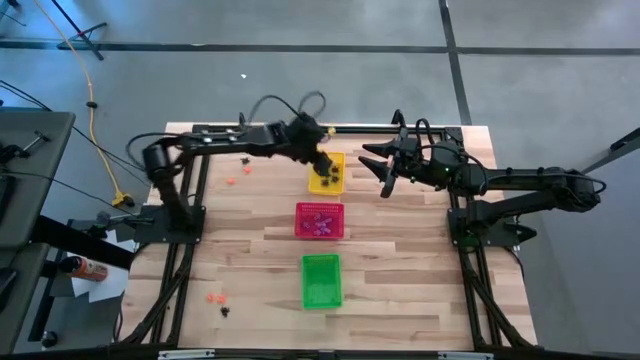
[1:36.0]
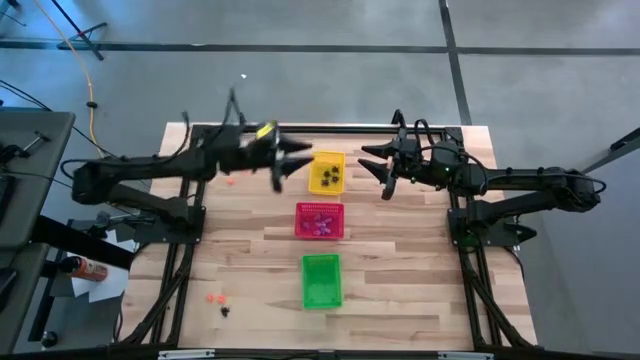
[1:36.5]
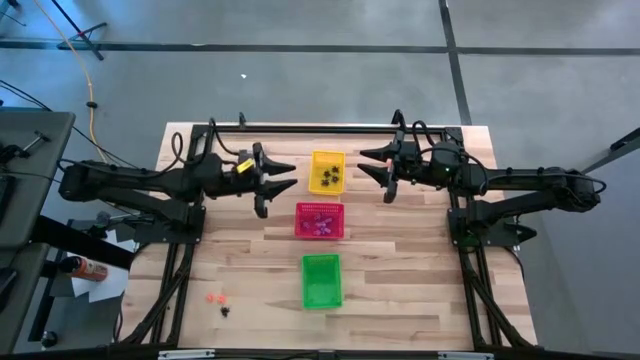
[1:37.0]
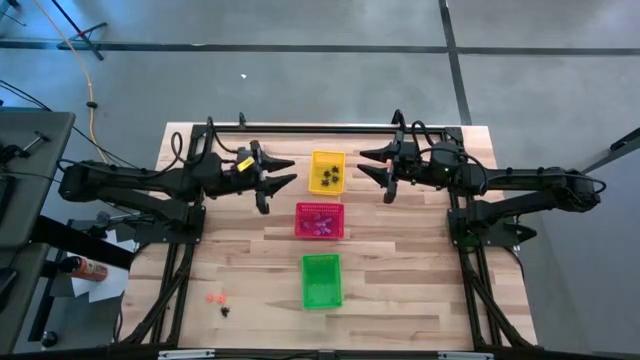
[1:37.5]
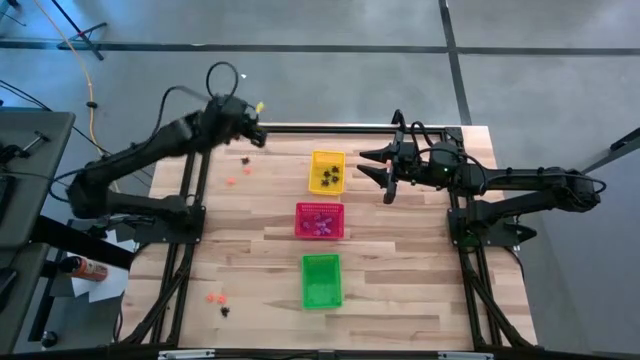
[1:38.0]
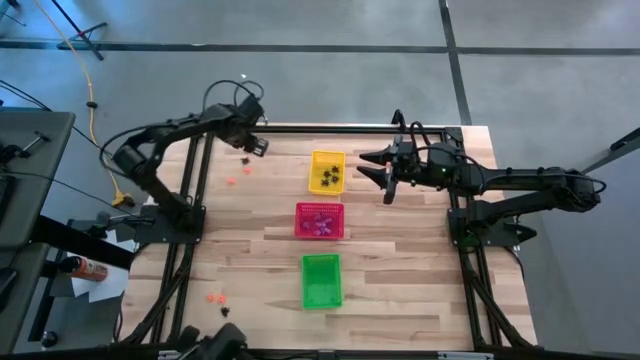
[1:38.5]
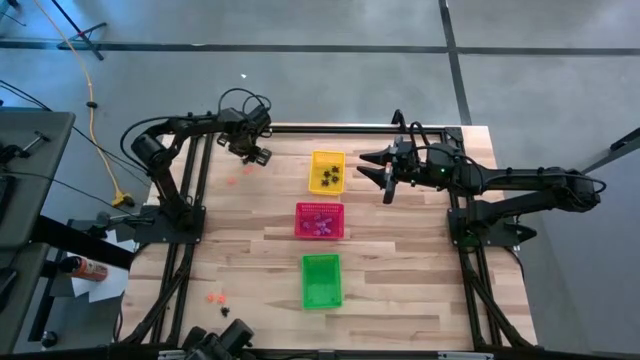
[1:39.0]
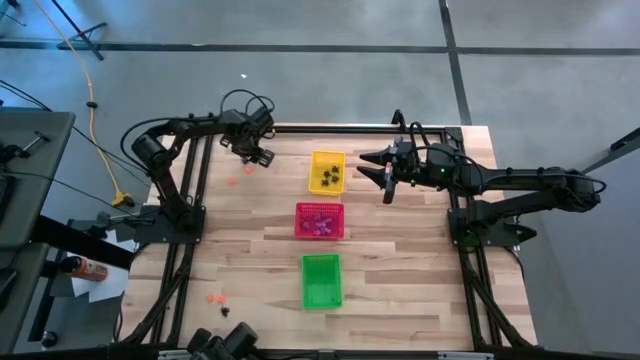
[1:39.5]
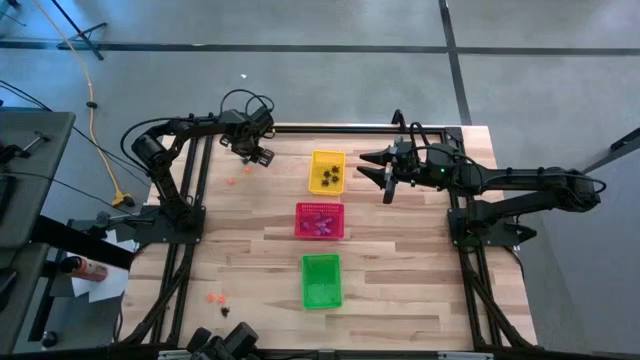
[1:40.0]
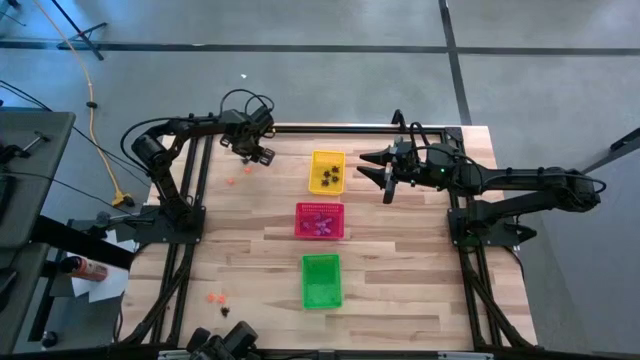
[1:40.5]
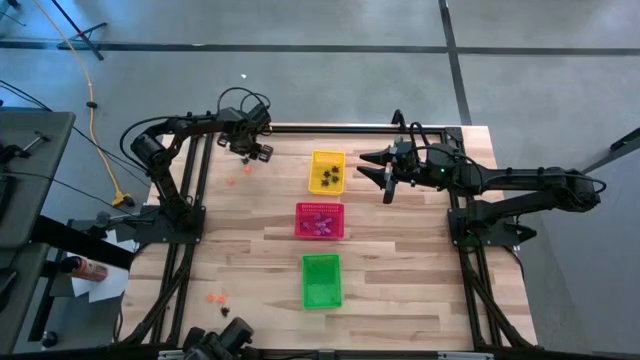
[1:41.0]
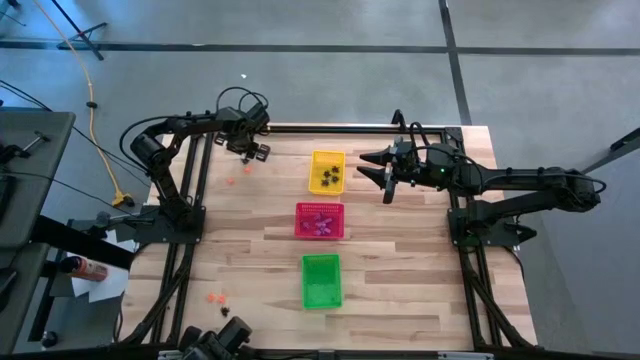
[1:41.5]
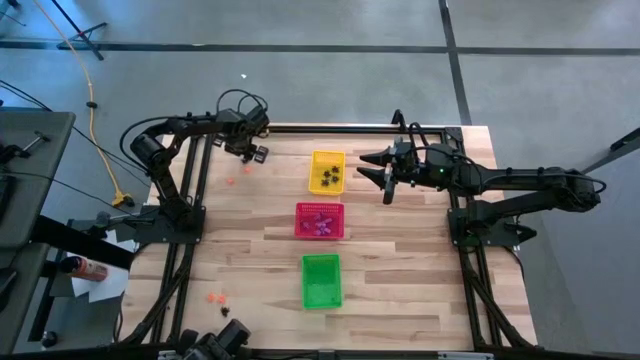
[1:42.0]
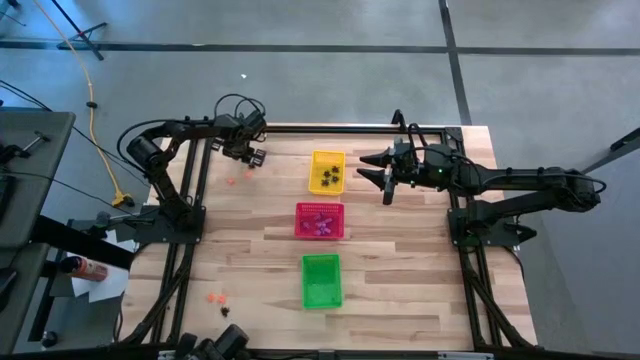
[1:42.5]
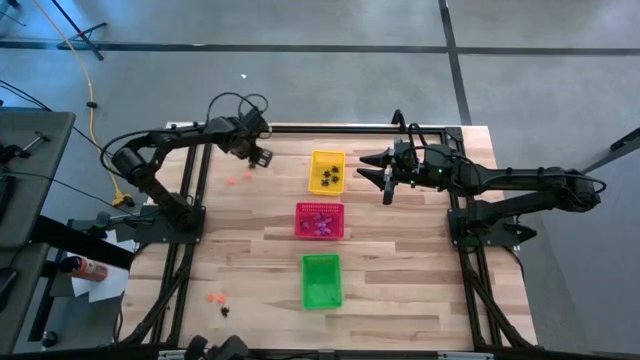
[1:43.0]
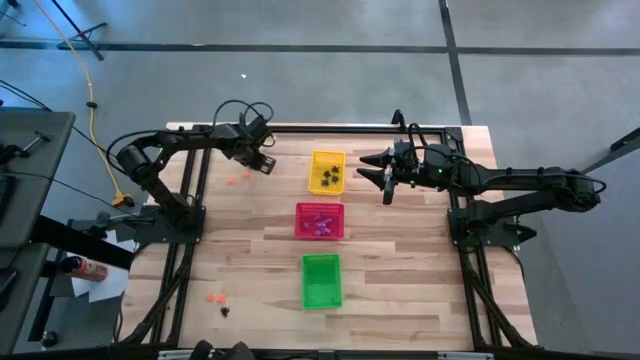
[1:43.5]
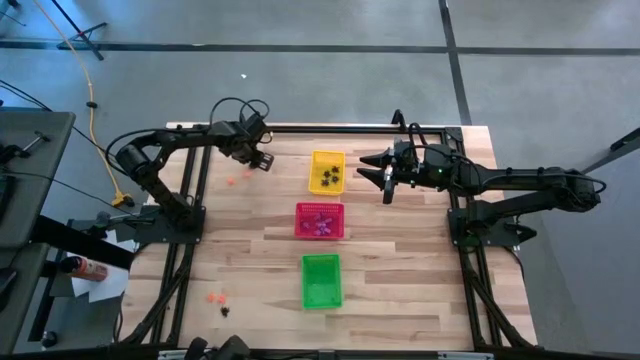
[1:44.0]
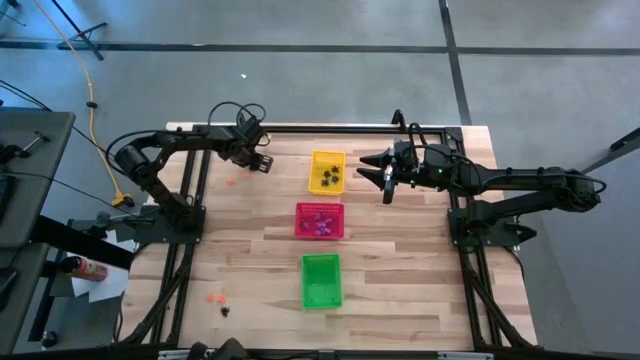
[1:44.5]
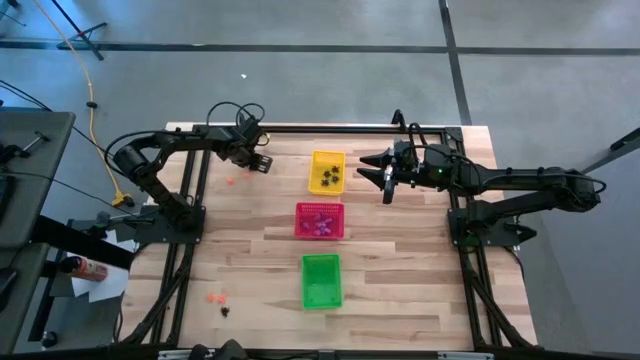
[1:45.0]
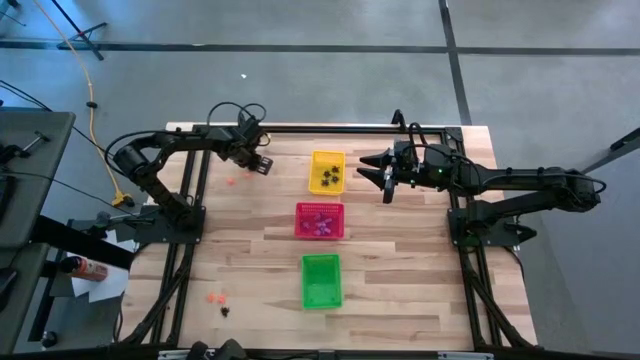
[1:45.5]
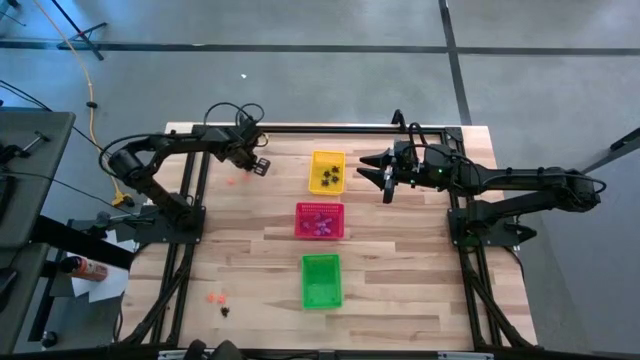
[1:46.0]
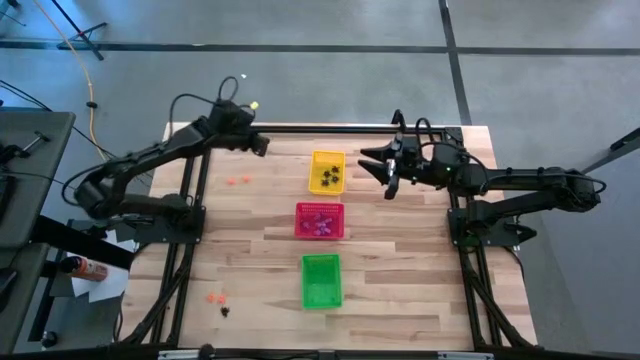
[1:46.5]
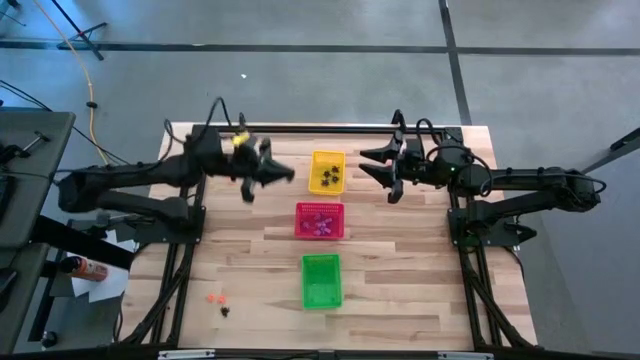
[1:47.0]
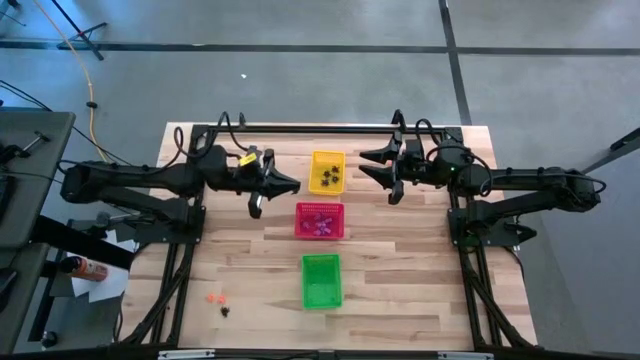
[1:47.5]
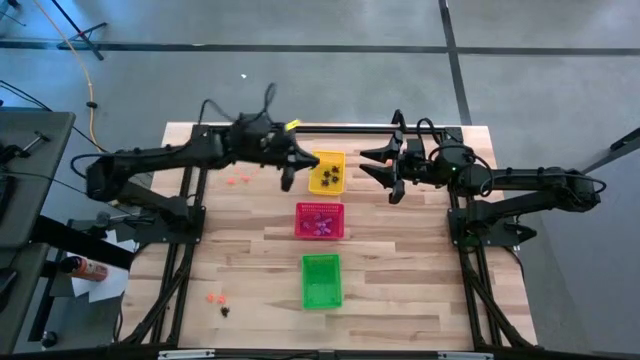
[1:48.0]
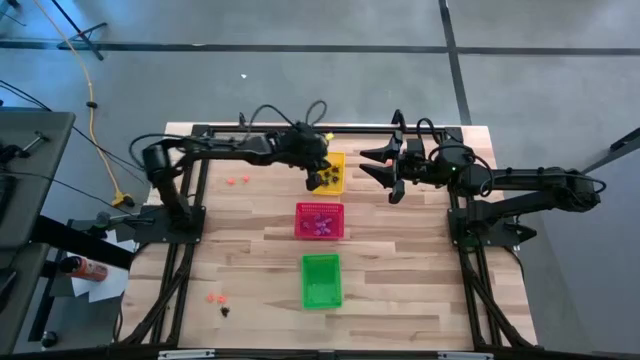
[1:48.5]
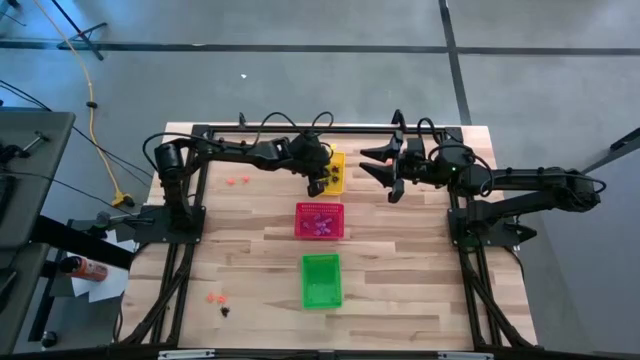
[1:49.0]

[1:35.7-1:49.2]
Task: Sort Halloween decoration
Put the black spider toy into the yellow bin

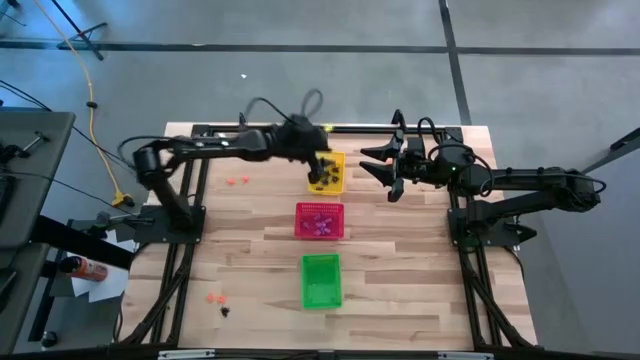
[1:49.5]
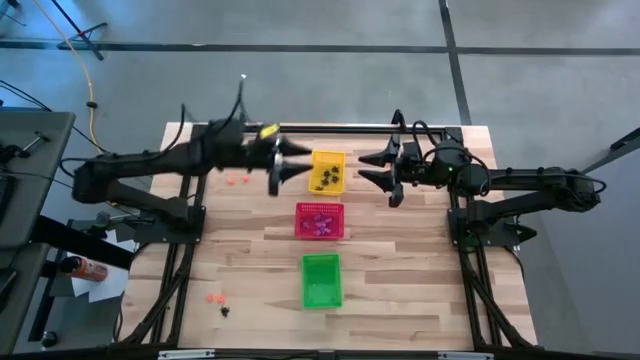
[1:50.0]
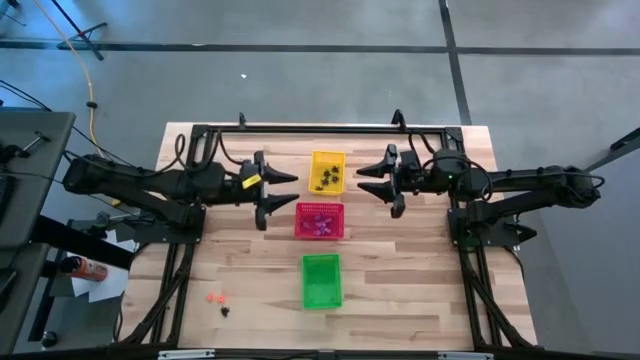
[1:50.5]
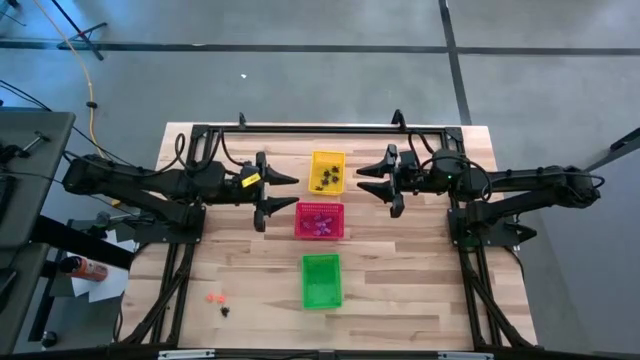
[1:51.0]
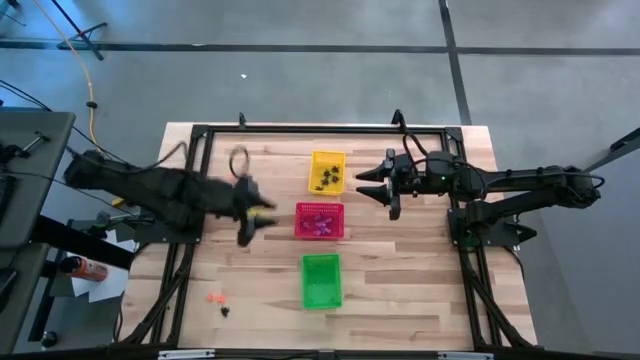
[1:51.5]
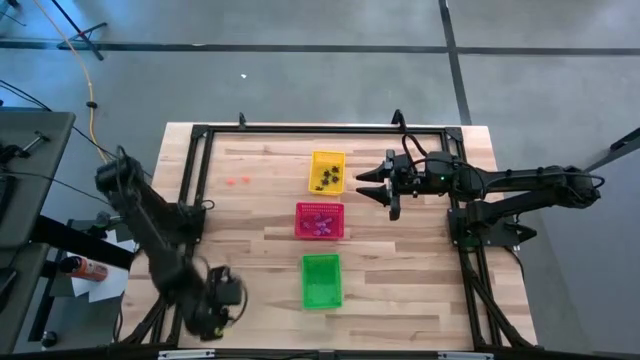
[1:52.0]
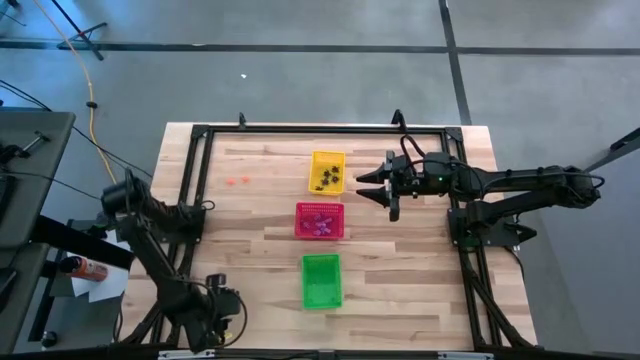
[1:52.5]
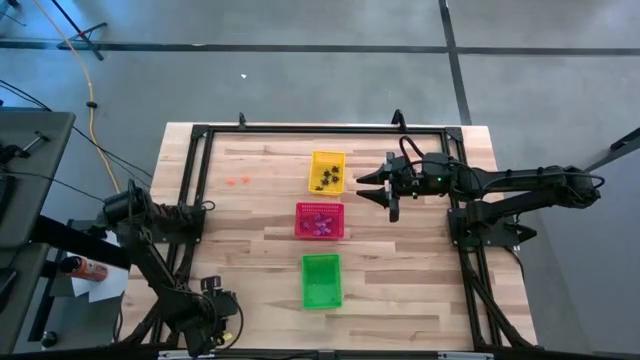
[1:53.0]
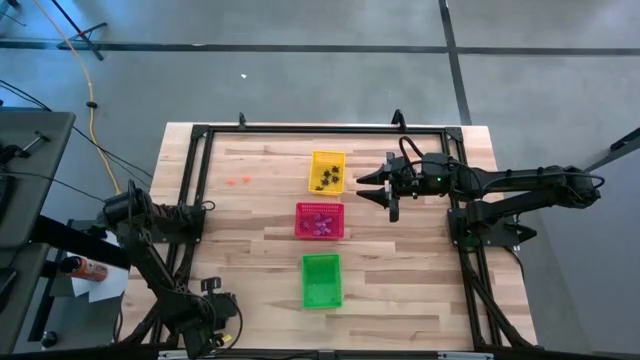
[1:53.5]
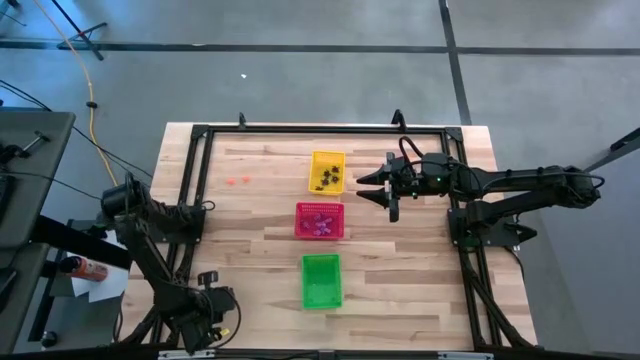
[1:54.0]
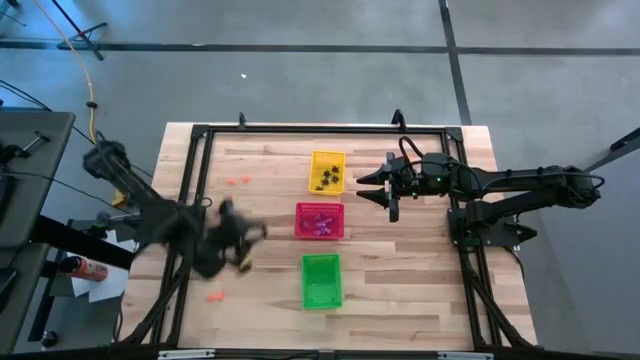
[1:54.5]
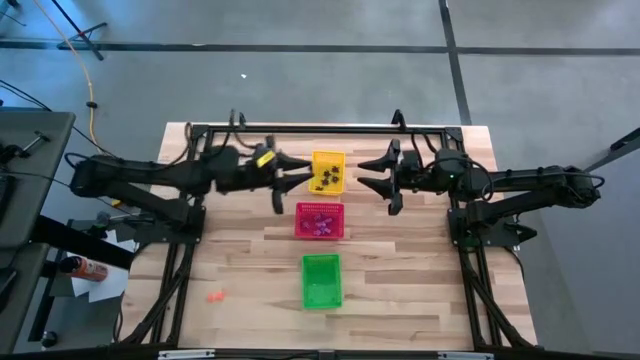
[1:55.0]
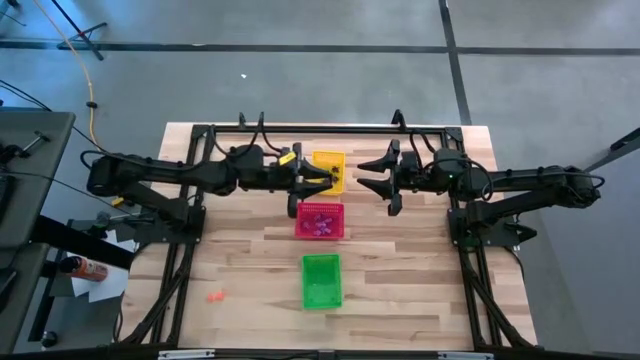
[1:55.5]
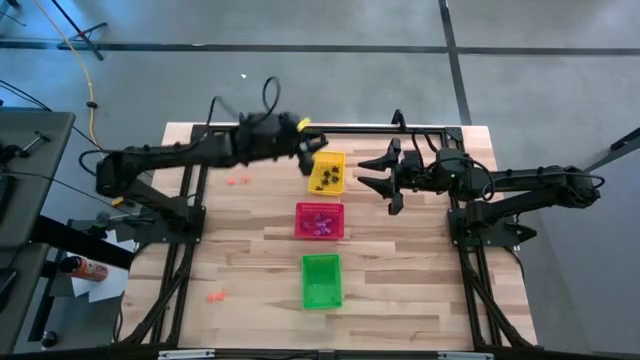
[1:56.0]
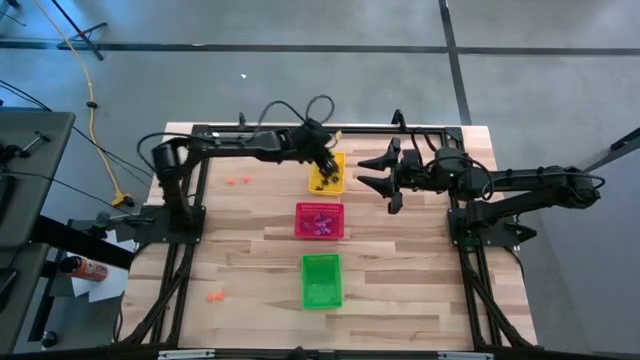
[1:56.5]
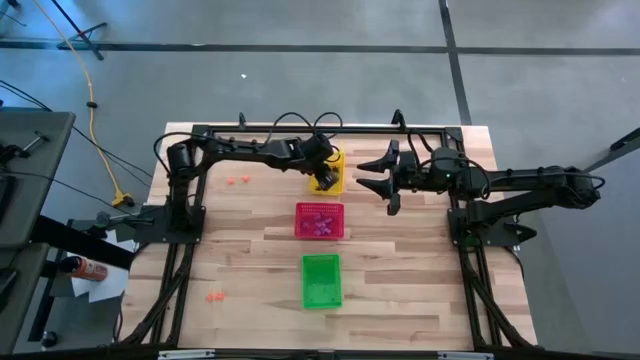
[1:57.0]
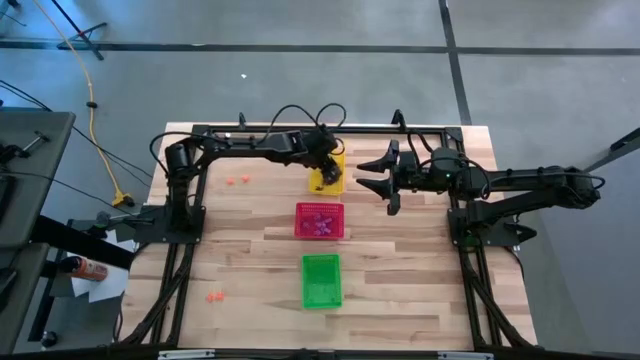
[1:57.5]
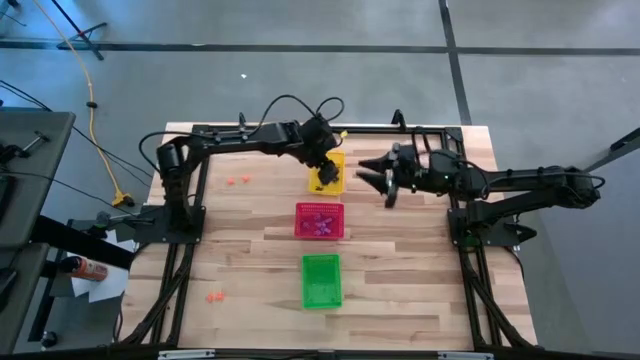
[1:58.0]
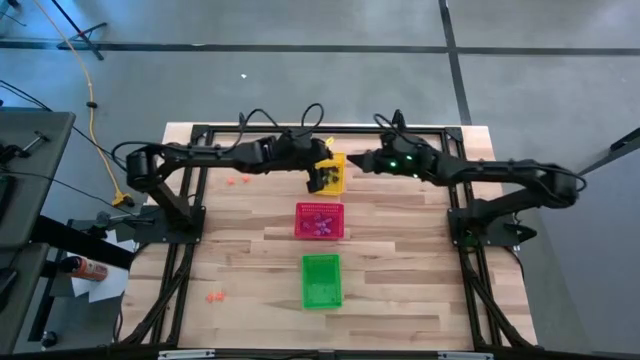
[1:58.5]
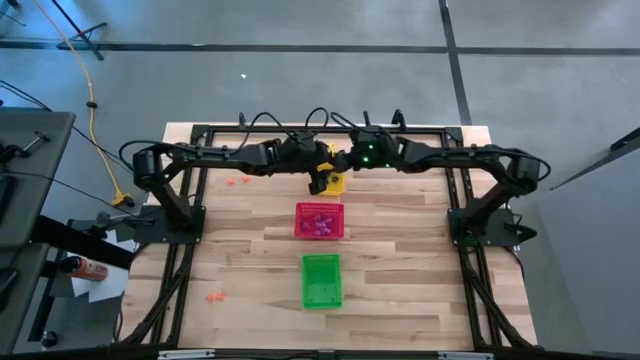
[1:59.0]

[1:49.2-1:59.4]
Put the black spider toy into the yellow bin
